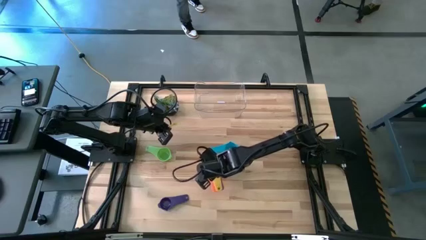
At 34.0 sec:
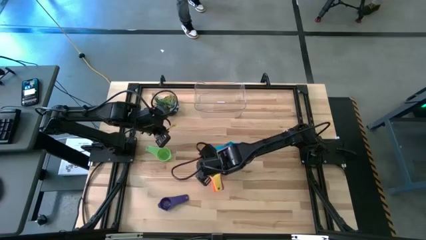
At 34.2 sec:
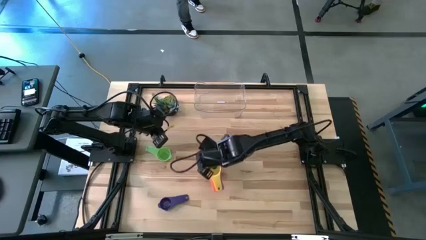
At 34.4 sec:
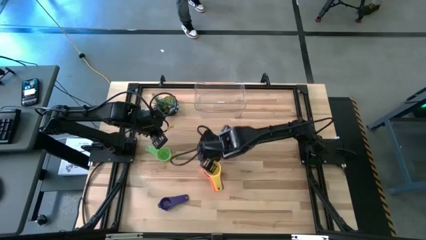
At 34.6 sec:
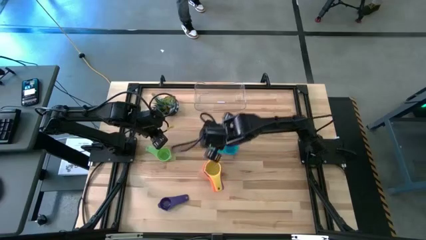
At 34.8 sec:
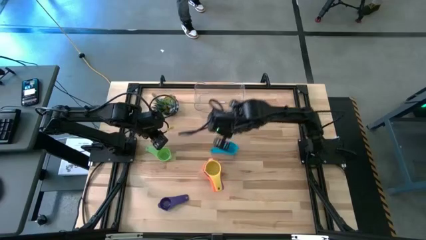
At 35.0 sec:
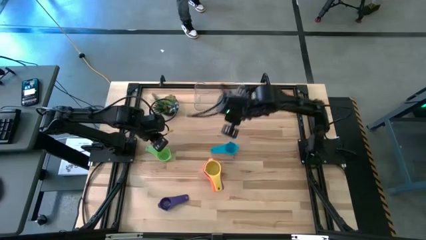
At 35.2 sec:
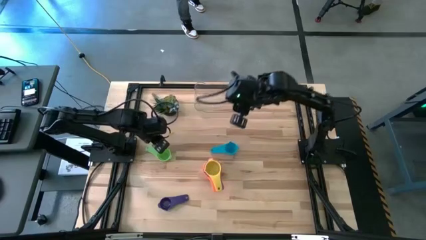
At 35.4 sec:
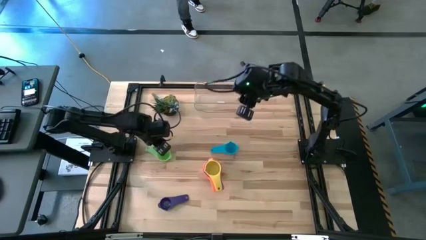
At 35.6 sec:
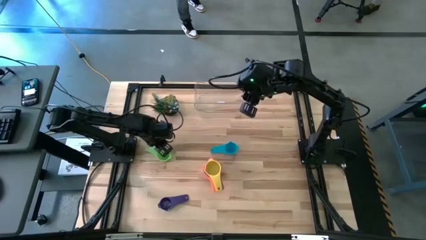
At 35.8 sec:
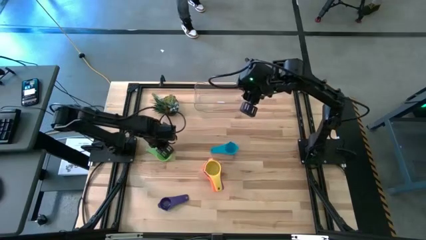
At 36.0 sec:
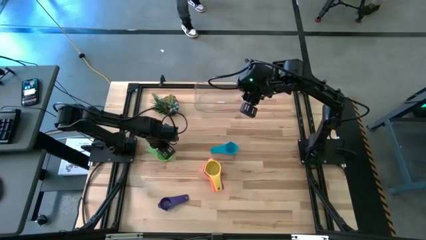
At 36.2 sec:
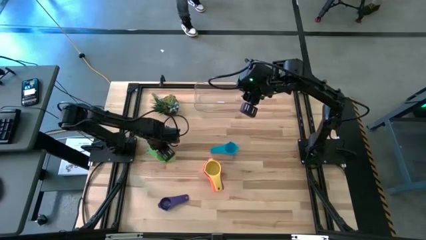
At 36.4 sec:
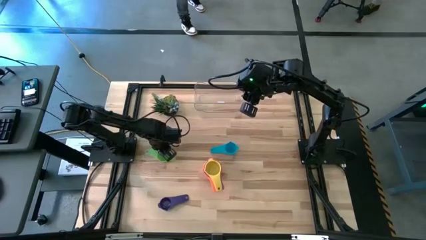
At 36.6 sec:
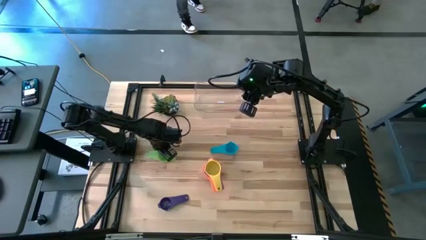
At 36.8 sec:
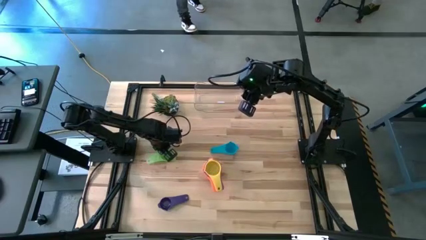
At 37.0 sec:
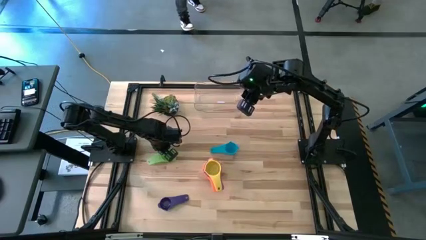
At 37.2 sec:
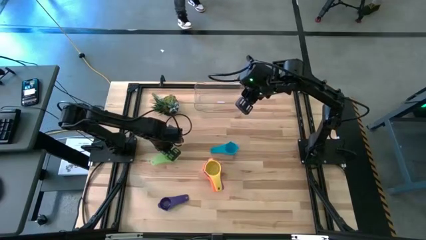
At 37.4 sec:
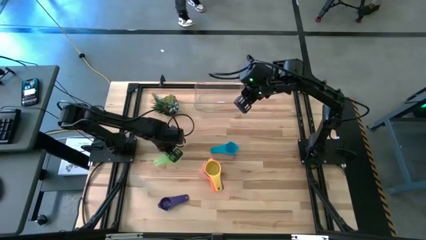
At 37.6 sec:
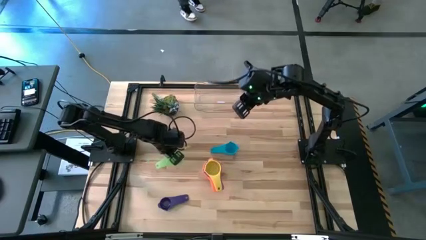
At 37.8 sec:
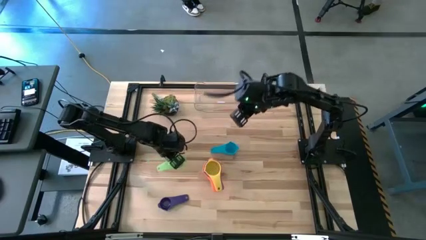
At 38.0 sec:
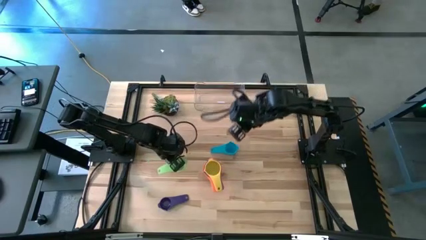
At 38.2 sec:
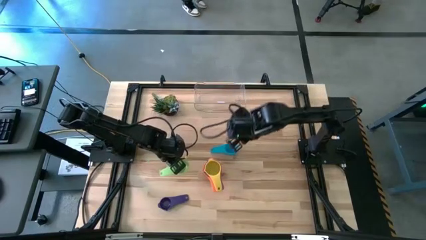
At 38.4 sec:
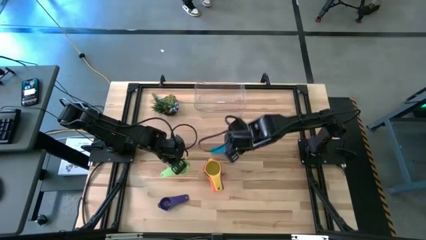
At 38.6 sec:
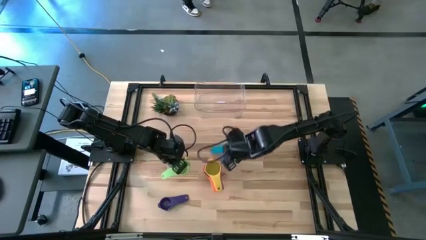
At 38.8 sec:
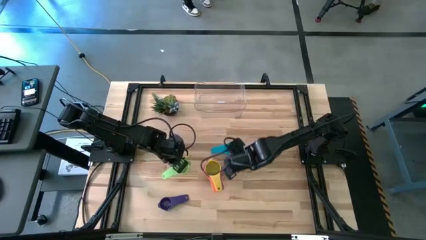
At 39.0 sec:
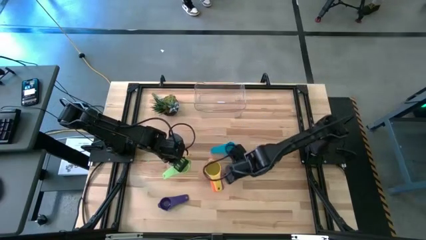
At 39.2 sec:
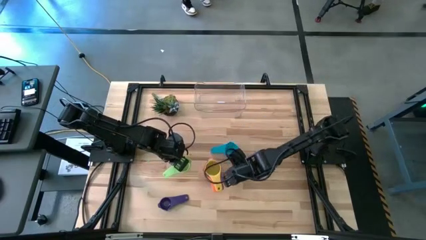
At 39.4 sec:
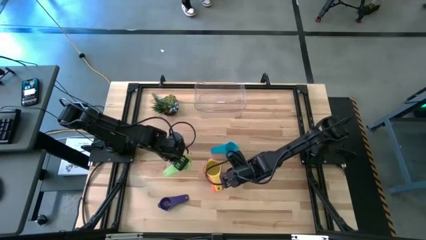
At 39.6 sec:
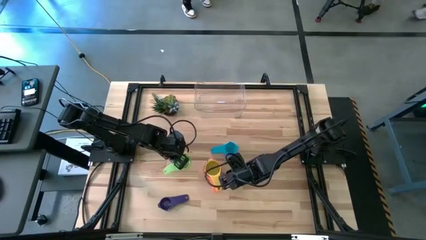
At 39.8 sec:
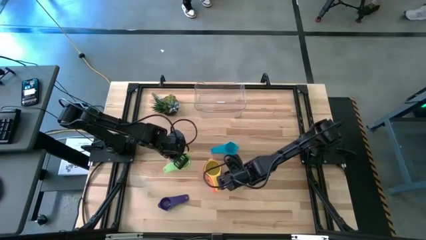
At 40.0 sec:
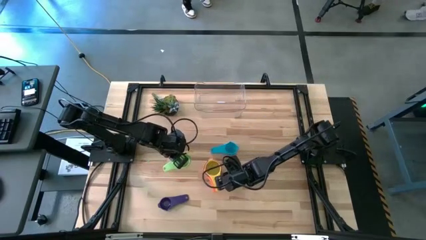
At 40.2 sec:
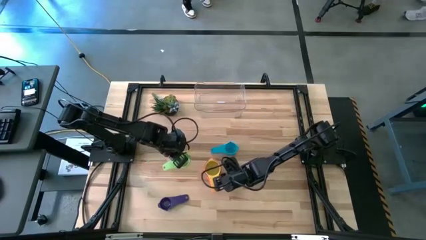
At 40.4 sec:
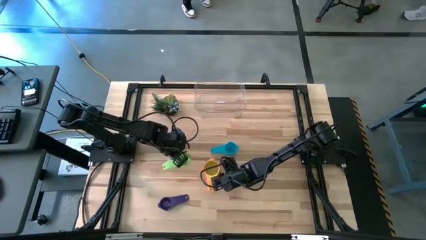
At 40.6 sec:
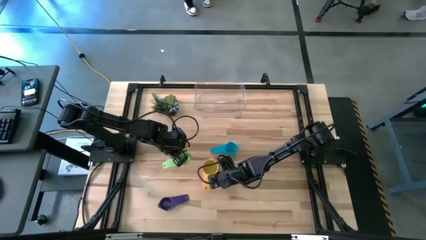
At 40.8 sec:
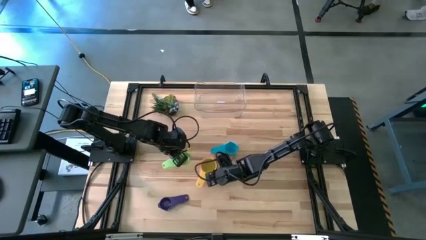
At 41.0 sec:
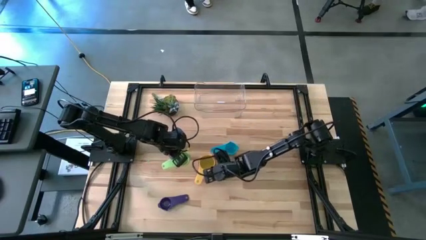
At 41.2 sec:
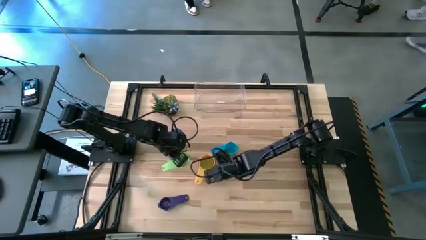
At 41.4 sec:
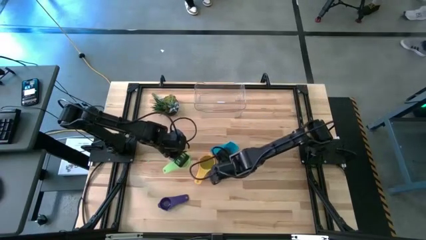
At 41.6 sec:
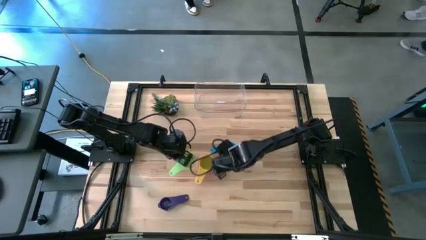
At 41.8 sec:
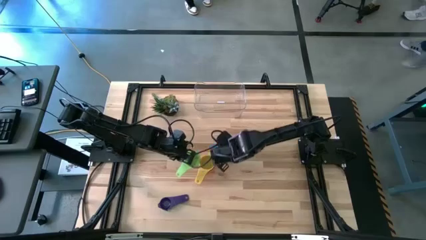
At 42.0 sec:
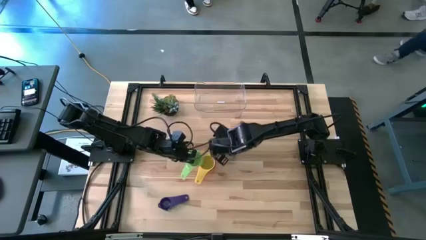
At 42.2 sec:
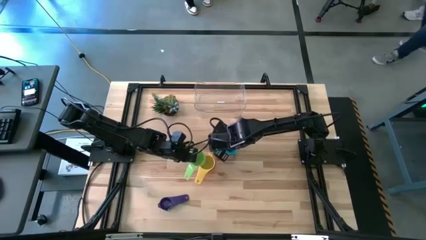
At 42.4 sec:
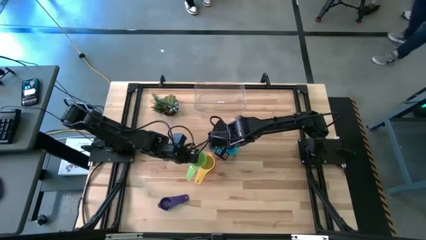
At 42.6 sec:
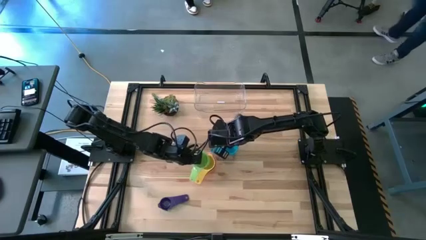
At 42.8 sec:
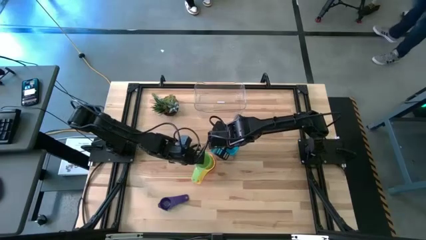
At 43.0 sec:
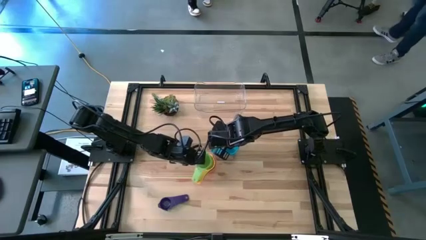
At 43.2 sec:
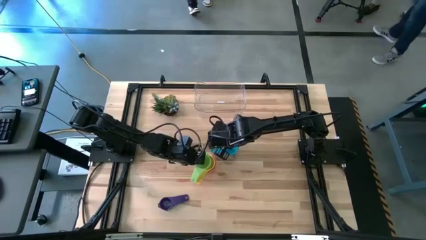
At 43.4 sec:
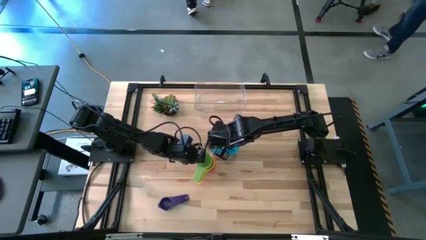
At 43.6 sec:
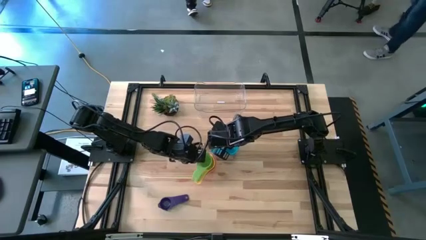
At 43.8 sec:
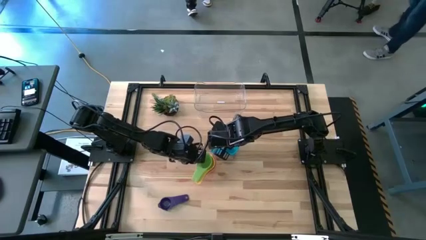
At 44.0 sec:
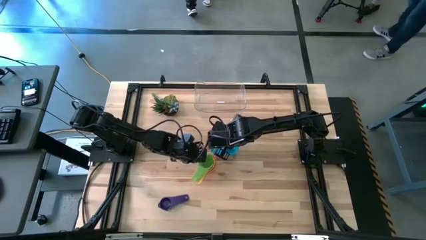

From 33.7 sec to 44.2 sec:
Task: Nest measuring cups in basket
Stack the green measuring cup on top of the yellow measuring cup

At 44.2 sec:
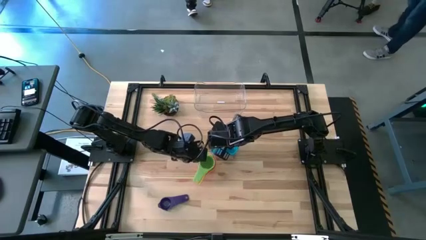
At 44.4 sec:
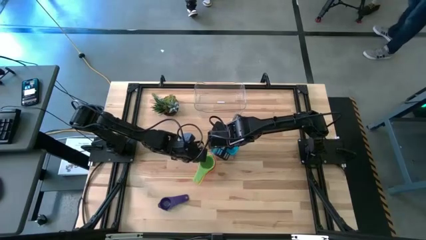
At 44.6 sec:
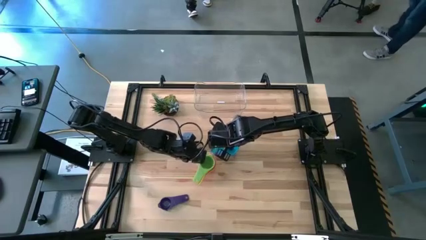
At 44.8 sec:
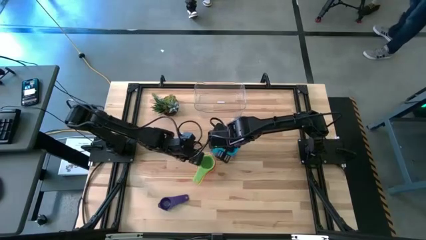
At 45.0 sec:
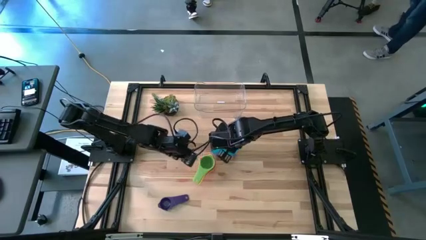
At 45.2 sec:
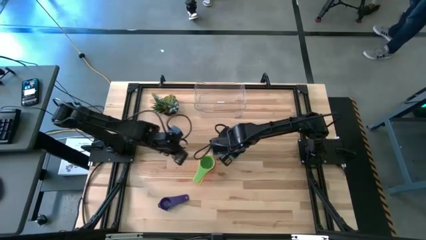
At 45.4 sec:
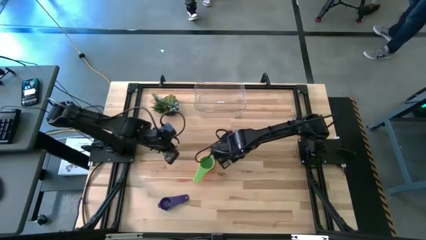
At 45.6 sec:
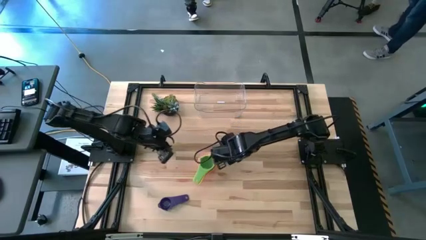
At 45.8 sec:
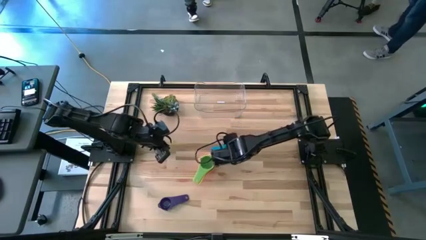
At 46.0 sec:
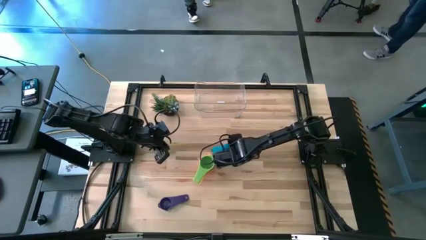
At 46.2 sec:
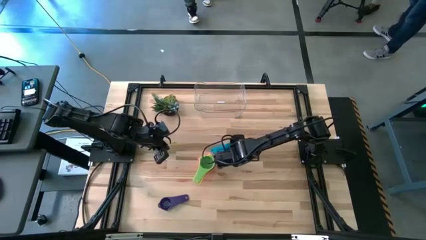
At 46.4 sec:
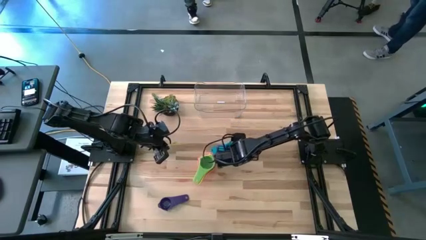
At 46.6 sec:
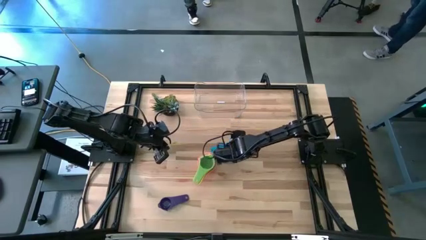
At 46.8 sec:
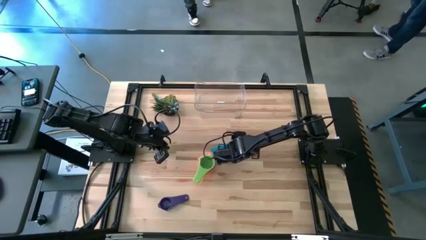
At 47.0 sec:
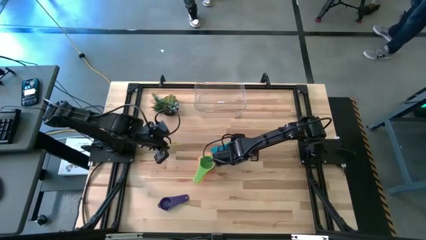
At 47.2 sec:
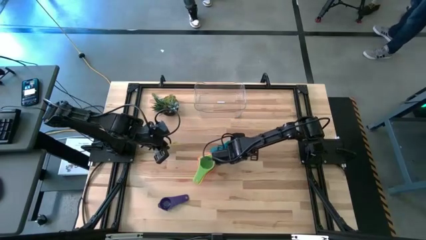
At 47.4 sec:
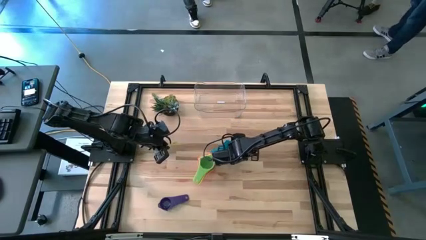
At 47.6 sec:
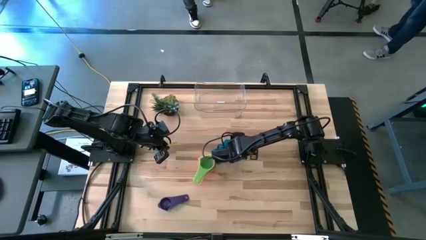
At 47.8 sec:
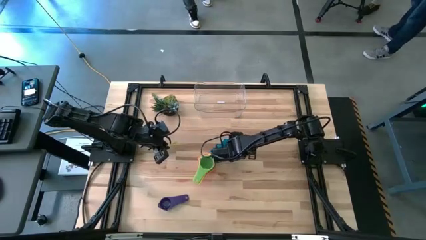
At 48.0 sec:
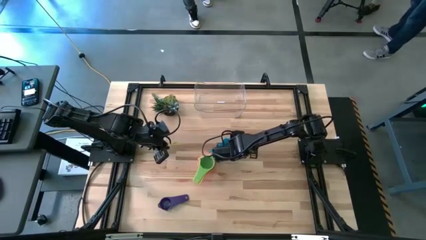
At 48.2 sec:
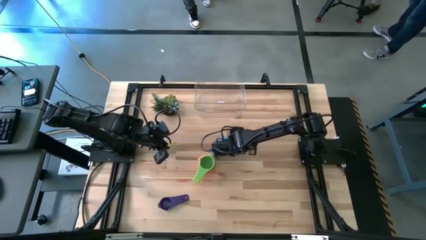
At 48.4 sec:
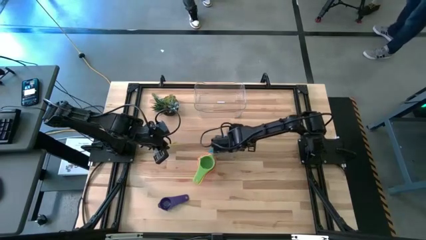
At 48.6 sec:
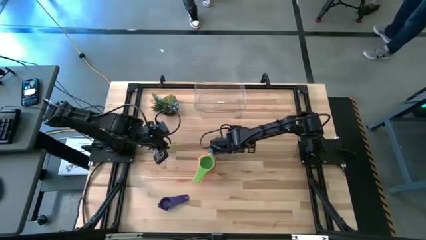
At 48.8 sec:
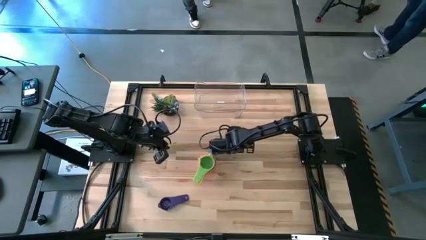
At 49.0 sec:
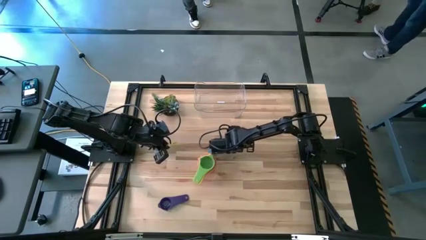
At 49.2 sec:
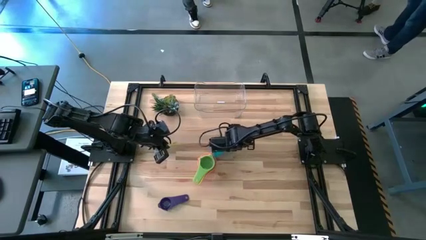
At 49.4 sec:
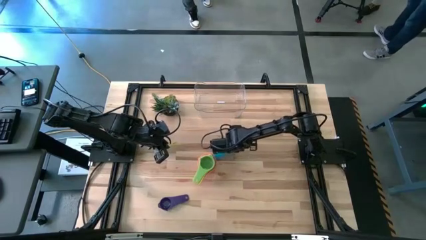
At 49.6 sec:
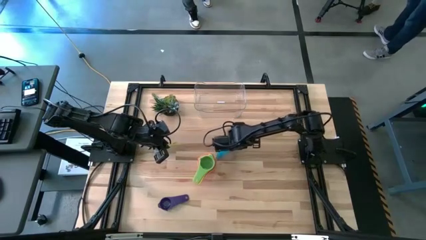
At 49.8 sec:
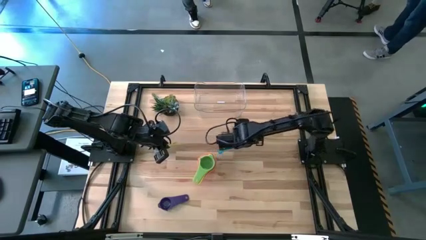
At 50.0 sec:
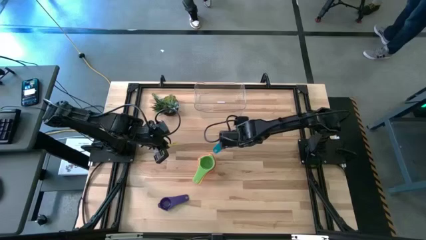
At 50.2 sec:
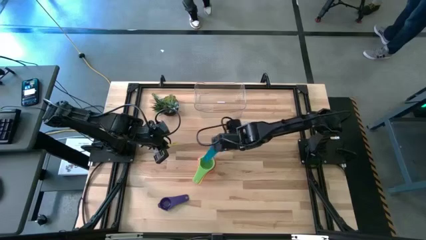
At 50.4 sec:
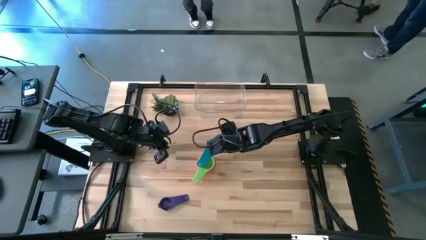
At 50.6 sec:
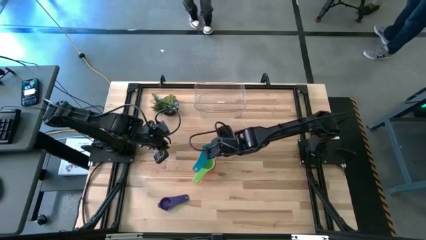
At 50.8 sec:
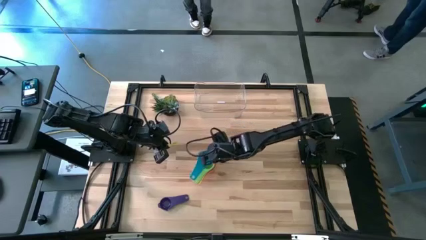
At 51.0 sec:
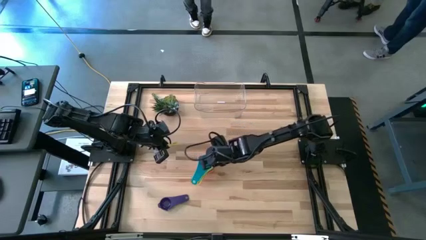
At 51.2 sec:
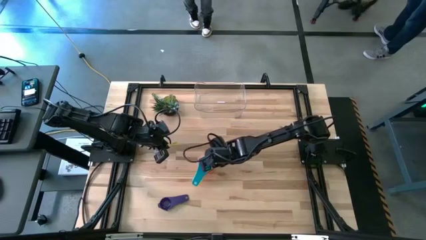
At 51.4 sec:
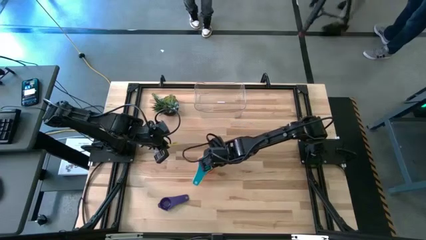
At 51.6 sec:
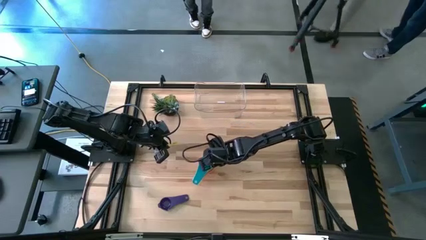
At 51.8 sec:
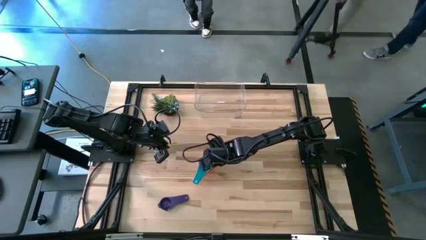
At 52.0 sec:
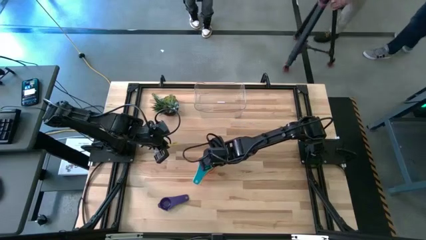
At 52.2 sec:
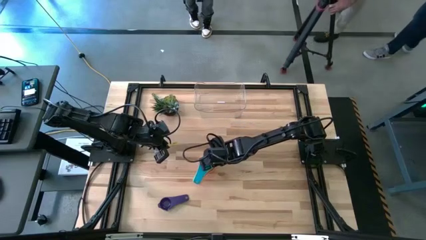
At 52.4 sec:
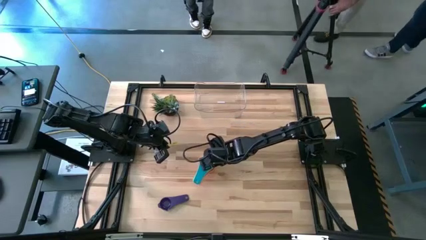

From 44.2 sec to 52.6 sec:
Stack the light blue measuring cup on top of the green measuring cup
